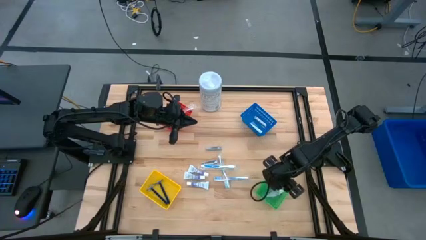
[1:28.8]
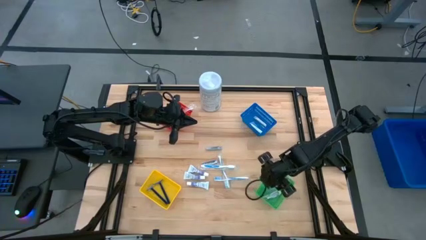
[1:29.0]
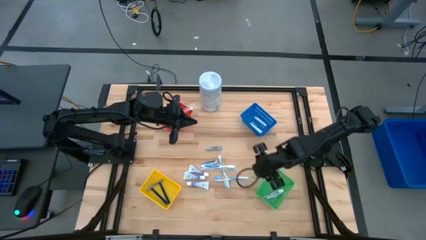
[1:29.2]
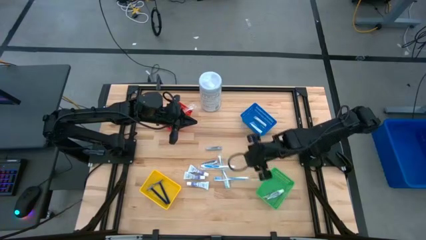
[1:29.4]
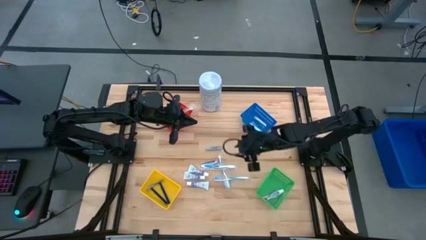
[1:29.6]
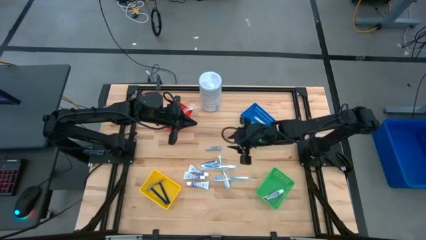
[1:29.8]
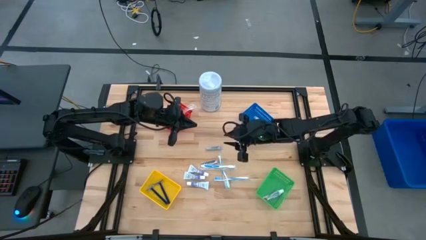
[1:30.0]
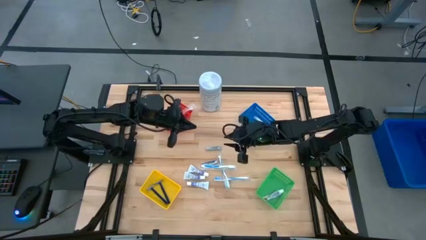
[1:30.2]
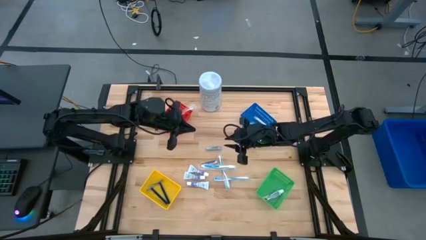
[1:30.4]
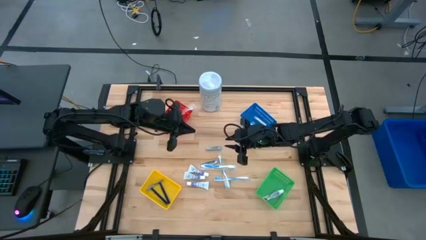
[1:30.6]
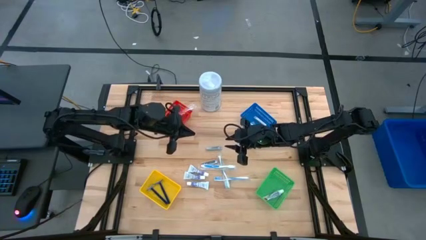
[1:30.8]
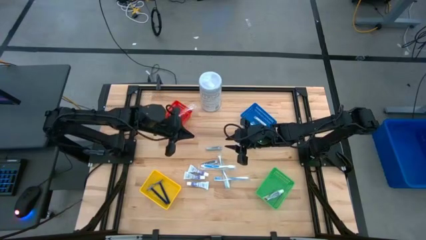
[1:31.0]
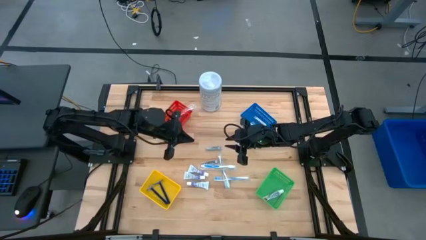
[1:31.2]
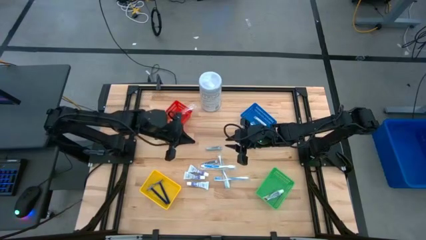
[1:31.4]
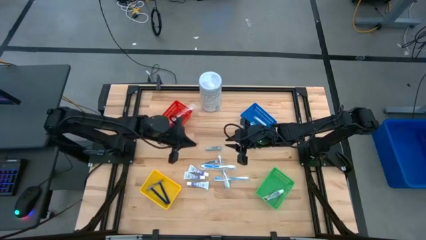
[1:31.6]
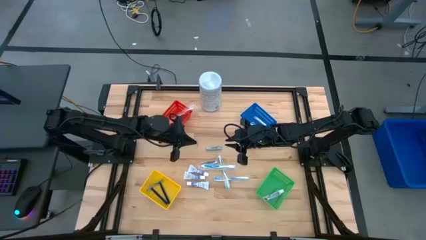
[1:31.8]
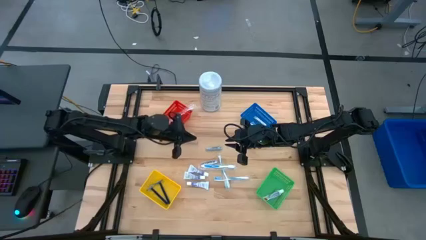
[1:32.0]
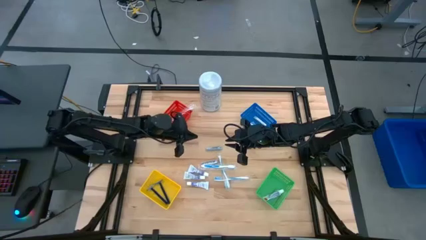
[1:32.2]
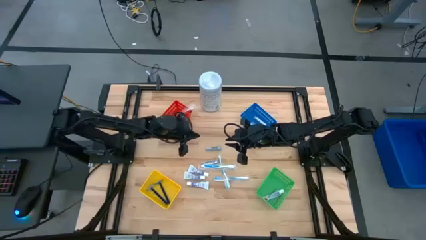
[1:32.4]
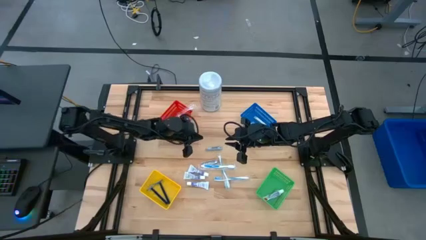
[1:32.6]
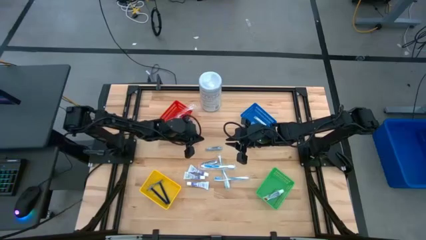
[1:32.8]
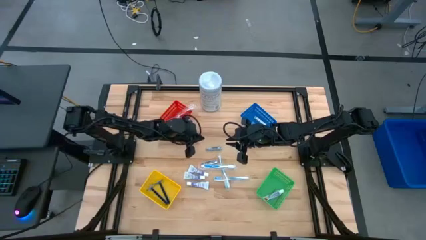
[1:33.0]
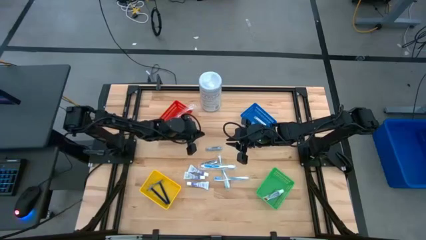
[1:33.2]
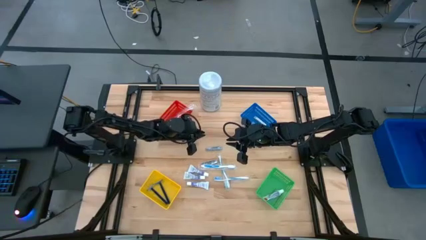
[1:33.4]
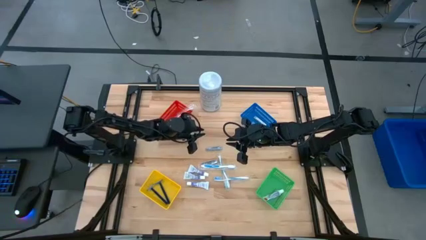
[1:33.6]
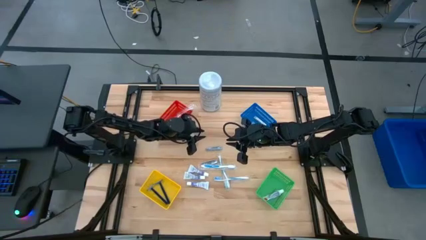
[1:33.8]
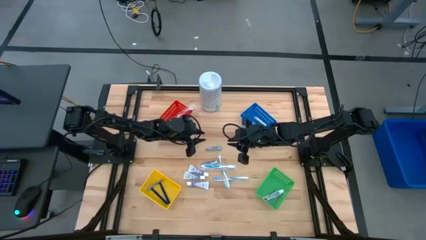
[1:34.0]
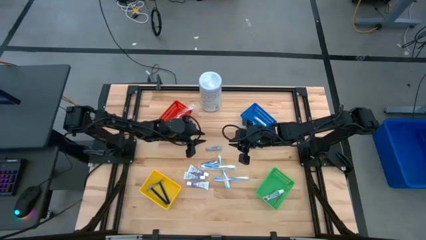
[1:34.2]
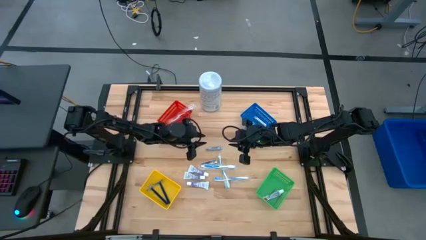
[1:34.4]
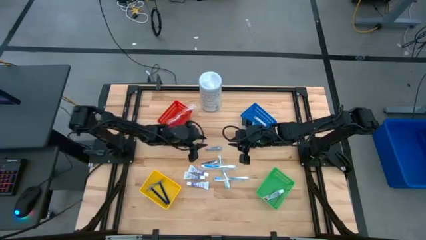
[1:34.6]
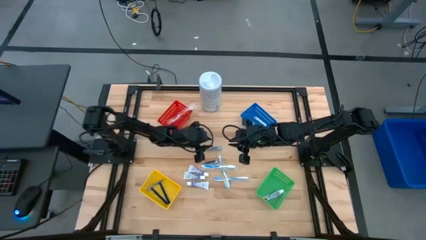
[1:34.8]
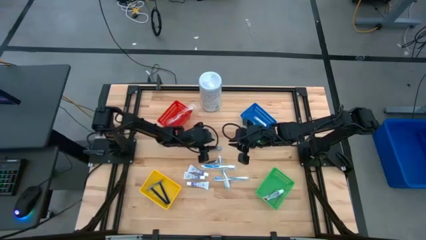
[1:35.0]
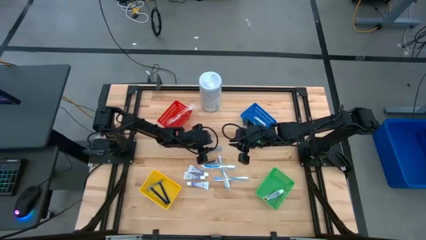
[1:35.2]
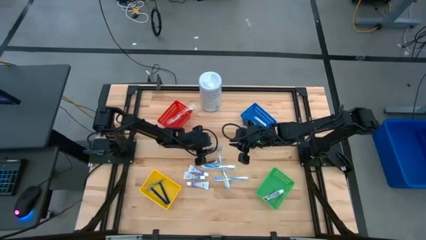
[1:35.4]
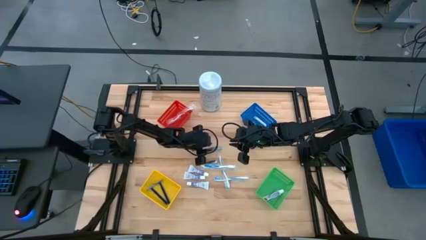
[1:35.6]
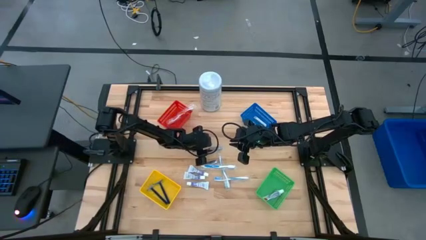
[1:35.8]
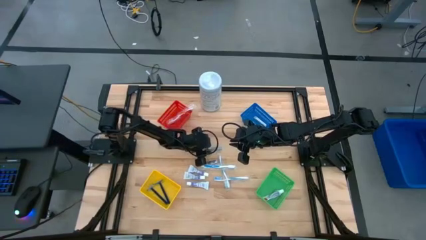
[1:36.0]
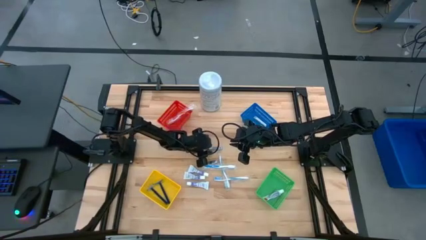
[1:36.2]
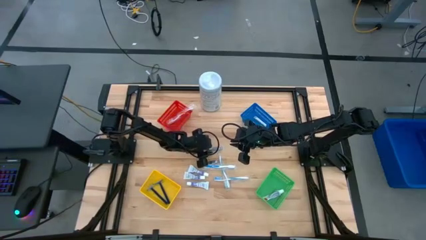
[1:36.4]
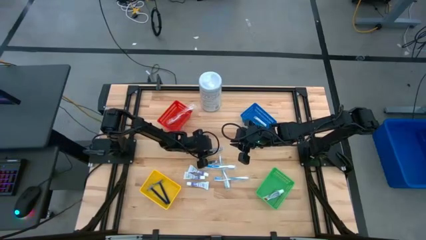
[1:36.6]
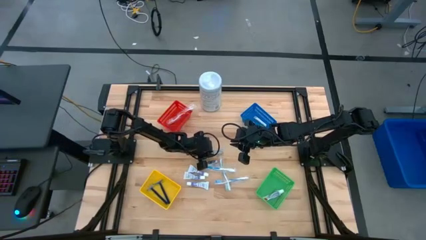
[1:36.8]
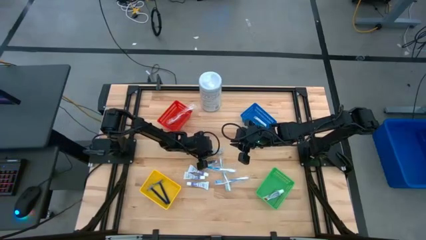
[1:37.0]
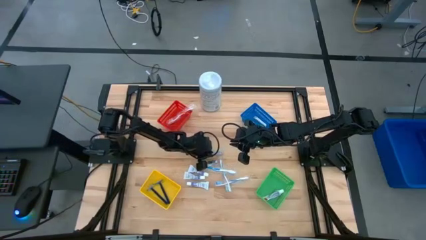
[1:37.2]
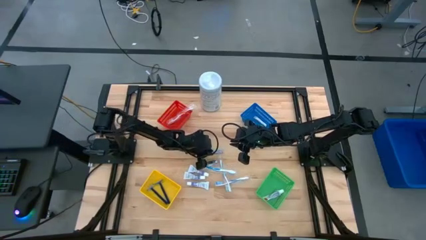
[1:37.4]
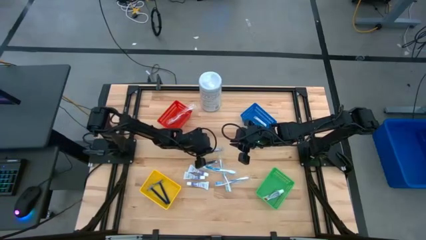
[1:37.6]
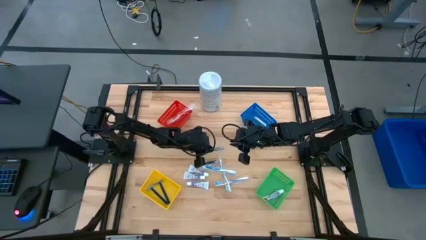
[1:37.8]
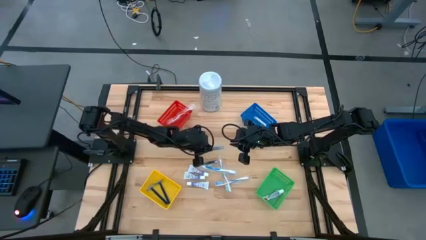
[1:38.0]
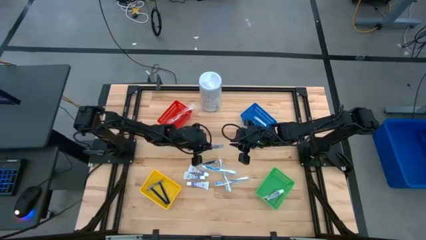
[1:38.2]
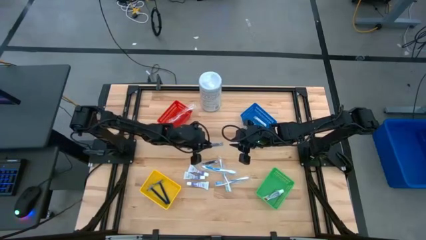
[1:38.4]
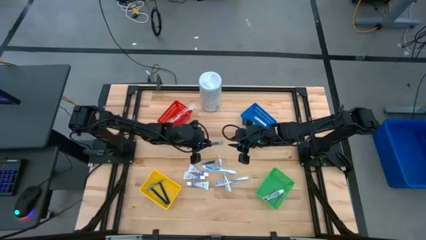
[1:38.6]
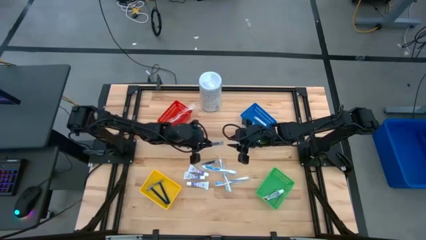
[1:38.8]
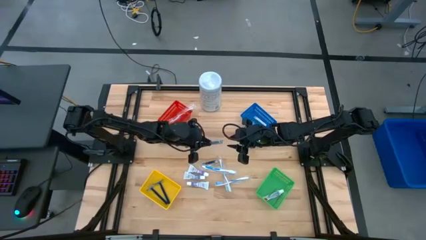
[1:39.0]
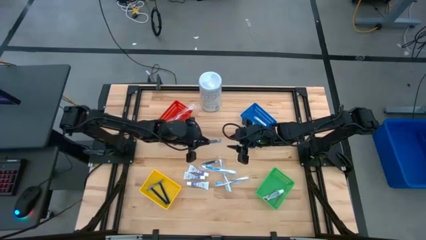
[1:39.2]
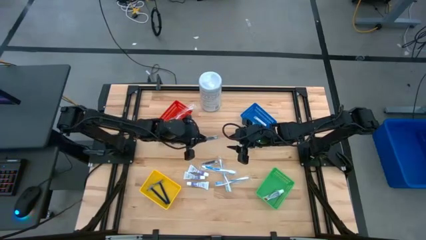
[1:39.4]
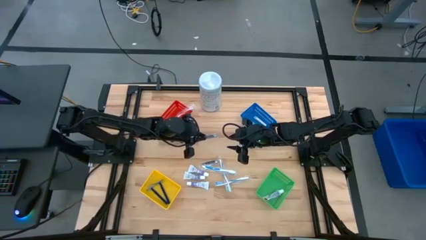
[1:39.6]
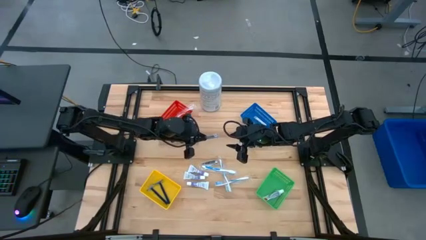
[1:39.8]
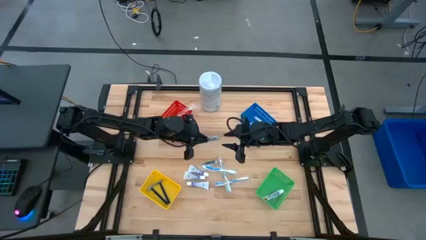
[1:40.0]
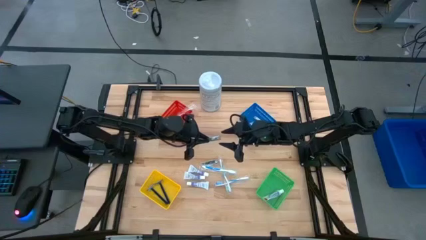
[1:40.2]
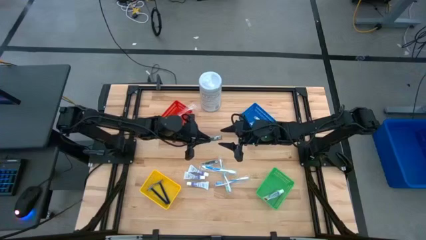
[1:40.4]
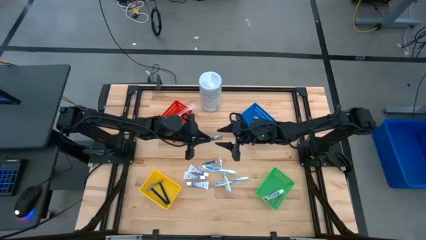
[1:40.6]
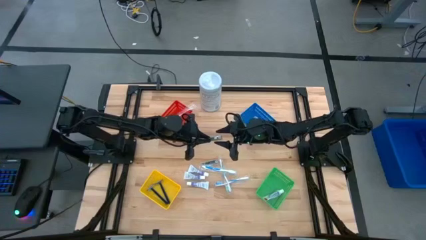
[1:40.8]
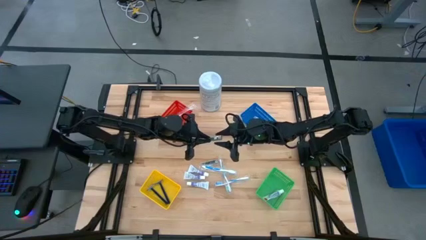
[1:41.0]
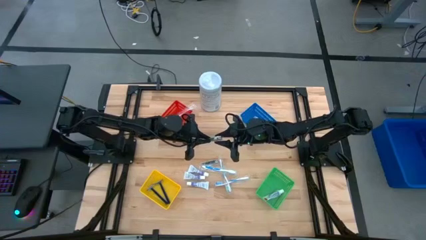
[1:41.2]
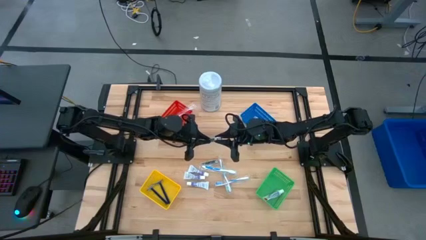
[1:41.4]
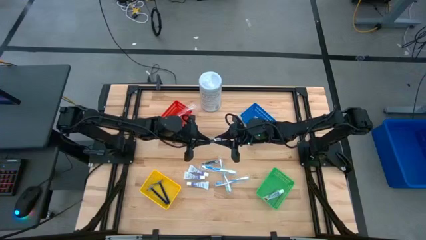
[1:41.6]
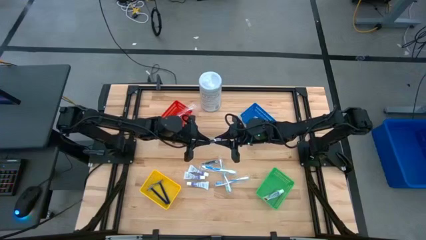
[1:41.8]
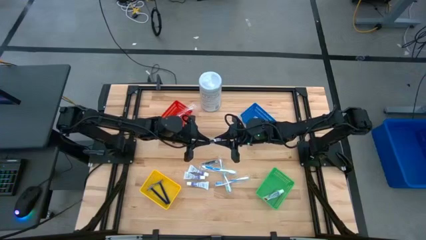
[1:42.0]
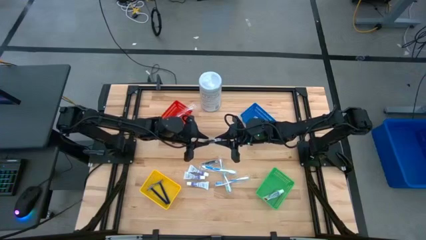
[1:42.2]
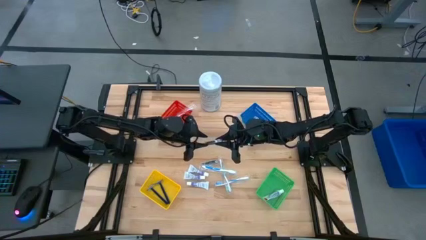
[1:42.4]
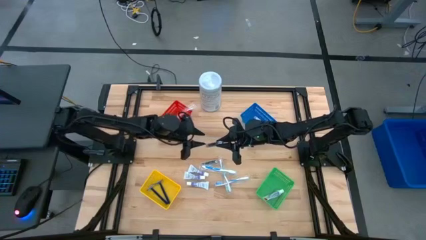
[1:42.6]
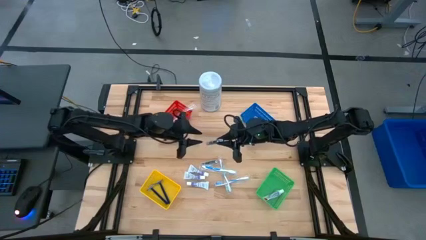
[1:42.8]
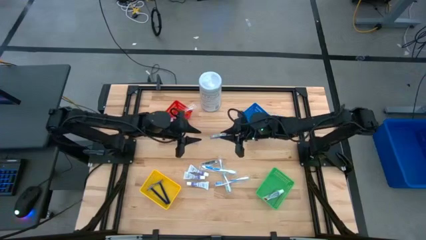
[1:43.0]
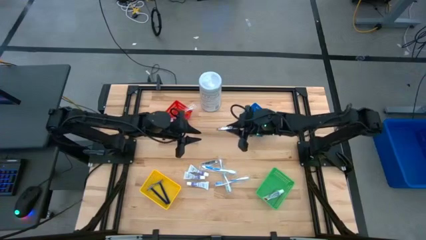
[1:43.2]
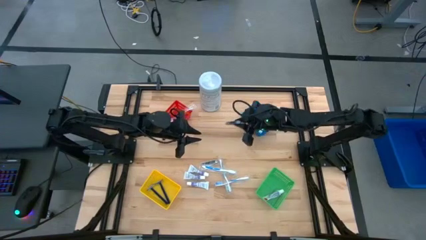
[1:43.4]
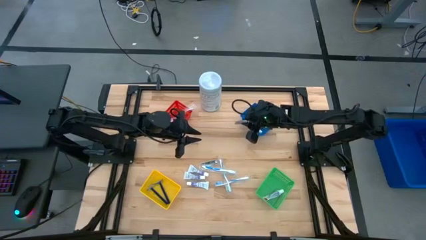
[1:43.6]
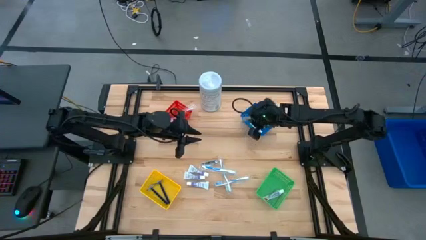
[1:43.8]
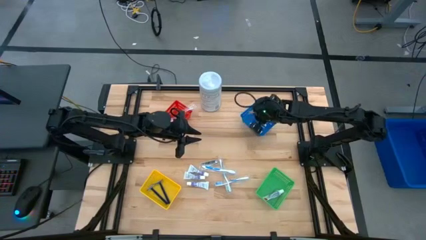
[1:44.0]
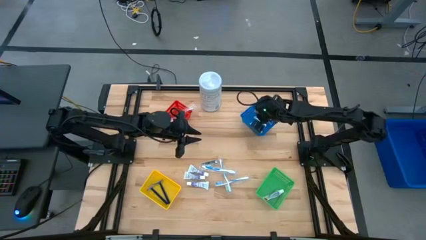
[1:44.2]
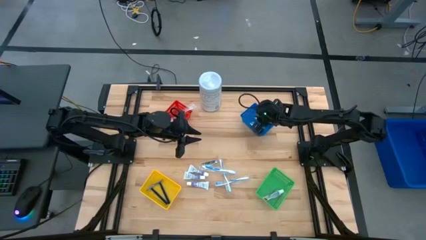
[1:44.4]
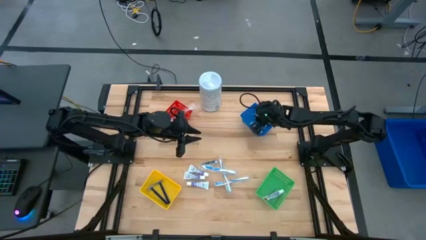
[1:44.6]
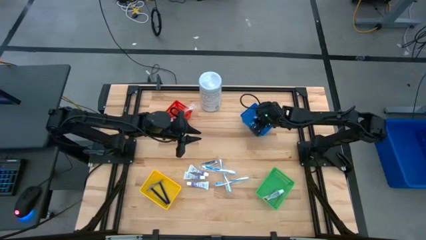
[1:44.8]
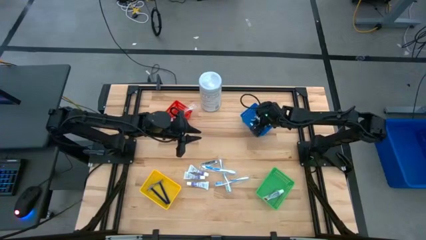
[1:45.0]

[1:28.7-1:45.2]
Task: Pick & Place Travel size toiletries
Put the silver nail clipper into the blue basket
